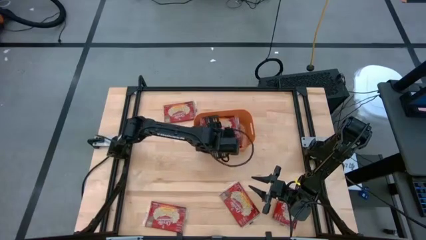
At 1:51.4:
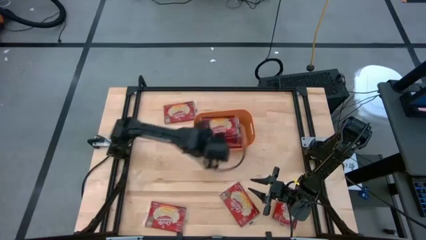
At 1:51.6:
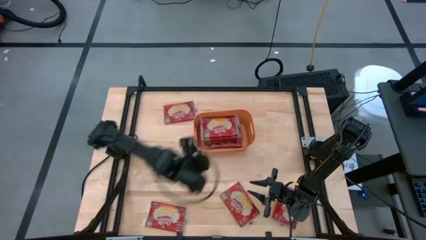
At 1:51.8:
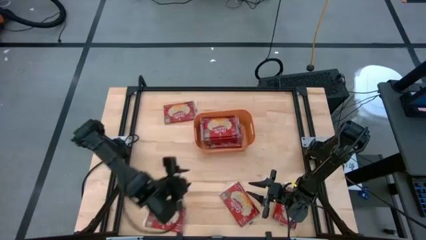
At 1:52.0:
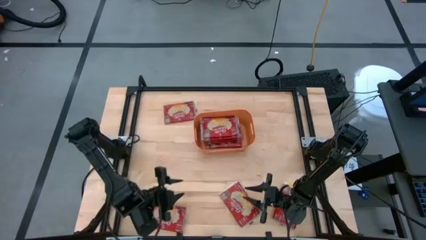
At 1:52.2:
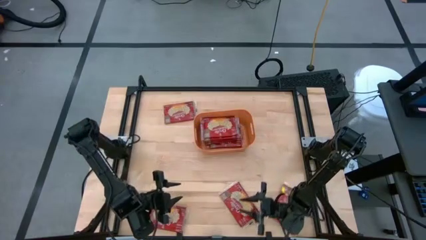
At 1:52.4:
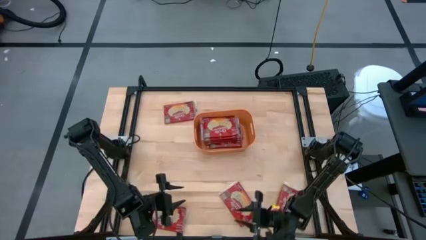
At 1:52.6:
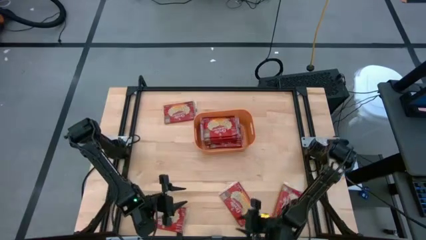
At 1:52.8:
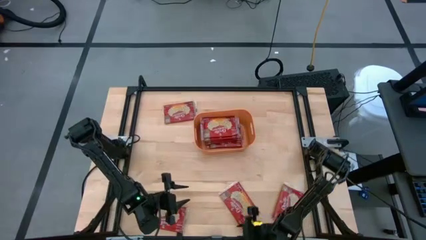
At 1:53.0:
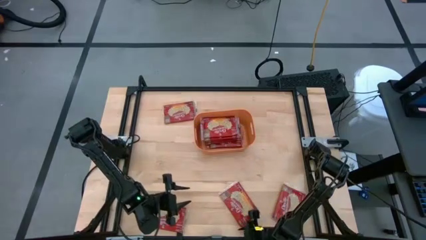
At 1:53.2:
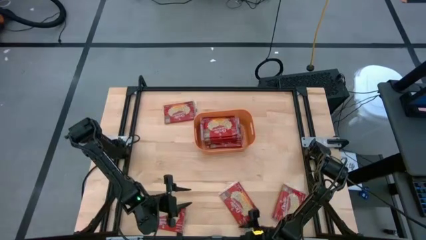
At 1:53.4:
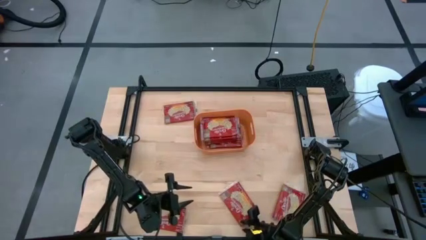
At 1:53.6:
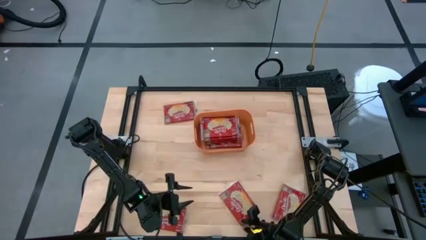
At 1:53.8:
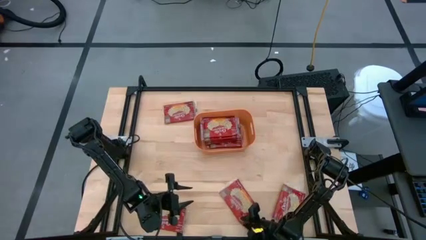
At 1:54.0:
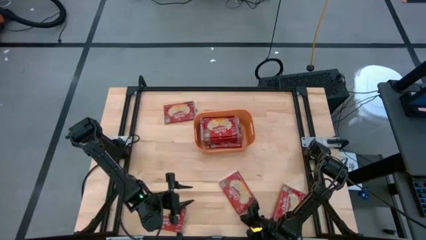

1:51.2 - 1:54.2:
Task: Sort popcorn bags into baskets
Put the red popcorn bag into the orange bin

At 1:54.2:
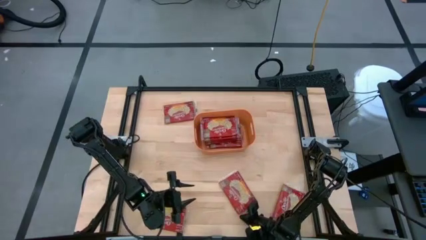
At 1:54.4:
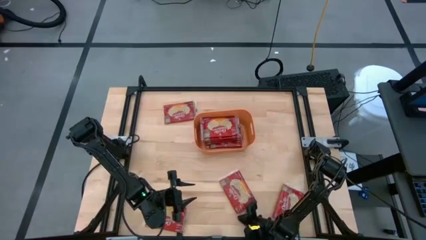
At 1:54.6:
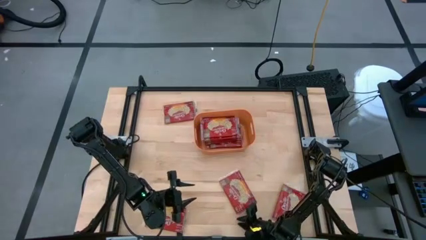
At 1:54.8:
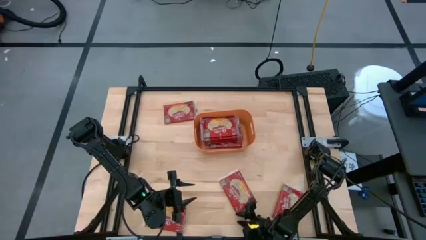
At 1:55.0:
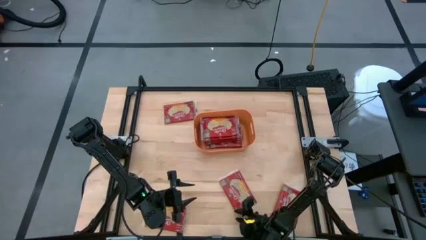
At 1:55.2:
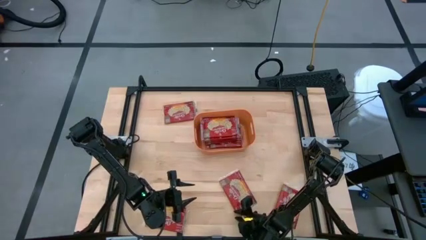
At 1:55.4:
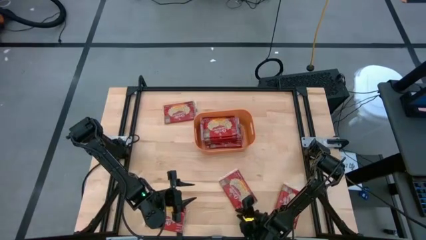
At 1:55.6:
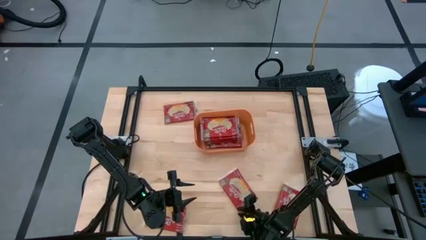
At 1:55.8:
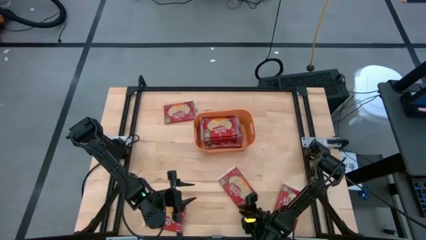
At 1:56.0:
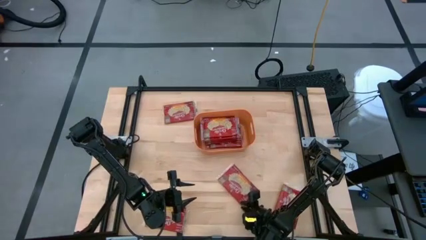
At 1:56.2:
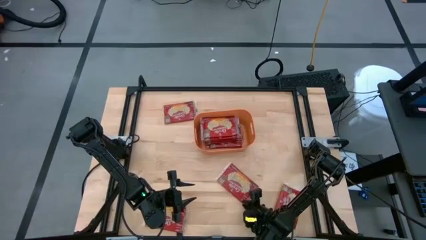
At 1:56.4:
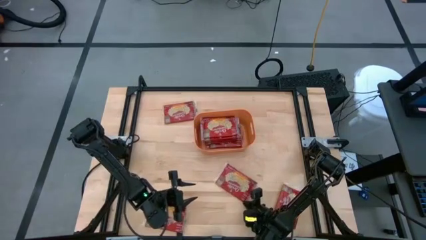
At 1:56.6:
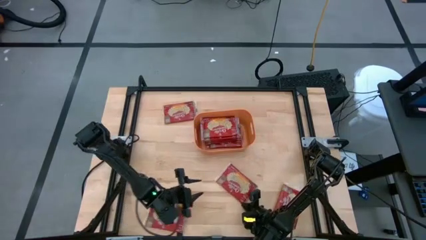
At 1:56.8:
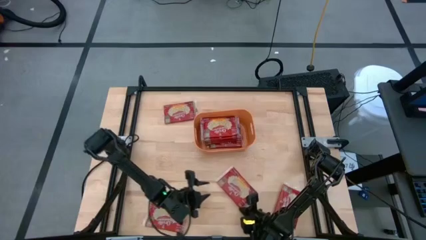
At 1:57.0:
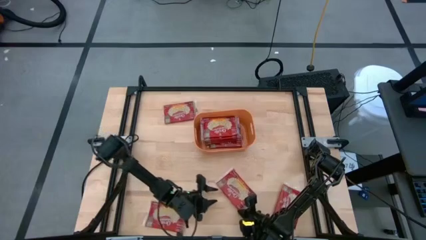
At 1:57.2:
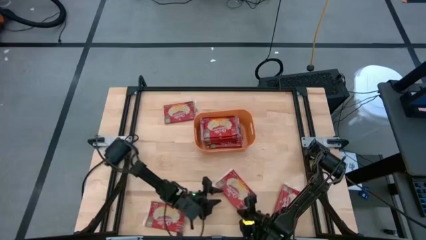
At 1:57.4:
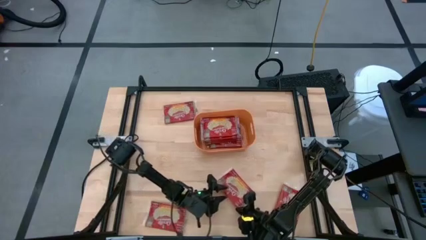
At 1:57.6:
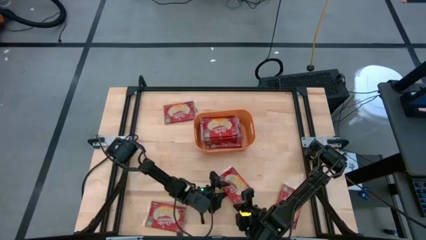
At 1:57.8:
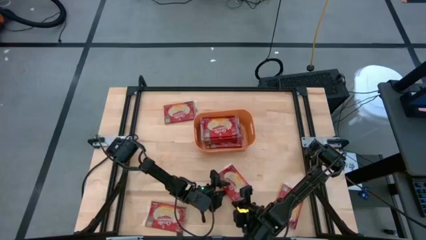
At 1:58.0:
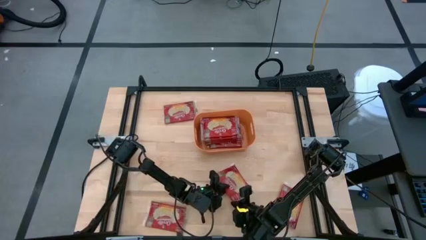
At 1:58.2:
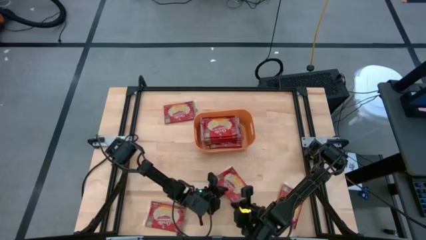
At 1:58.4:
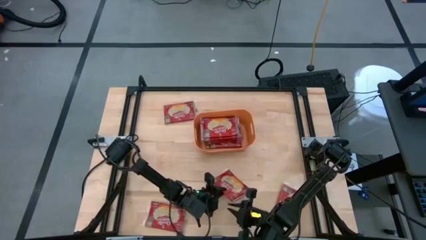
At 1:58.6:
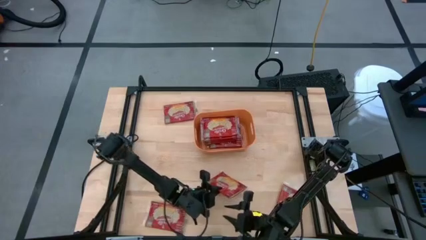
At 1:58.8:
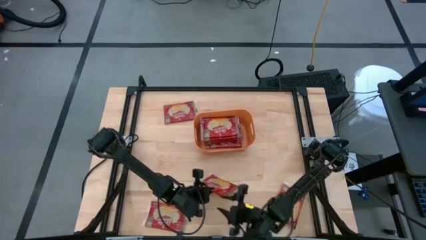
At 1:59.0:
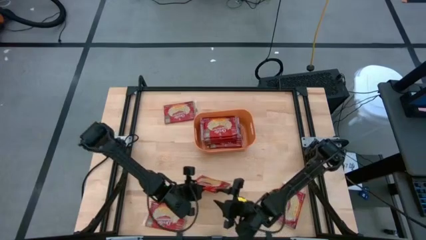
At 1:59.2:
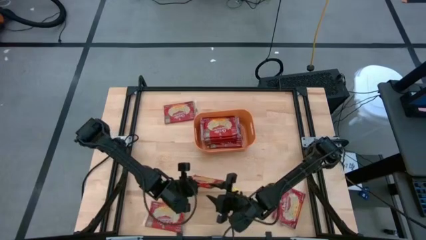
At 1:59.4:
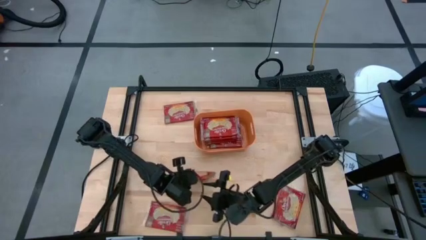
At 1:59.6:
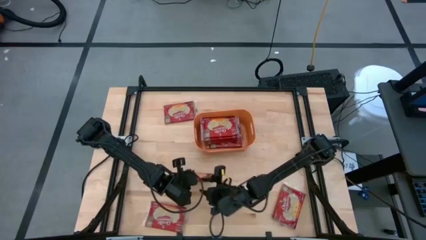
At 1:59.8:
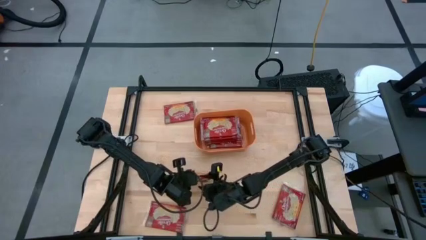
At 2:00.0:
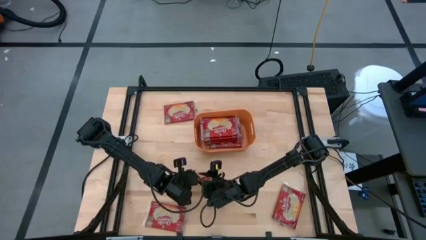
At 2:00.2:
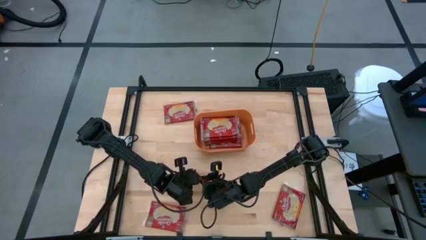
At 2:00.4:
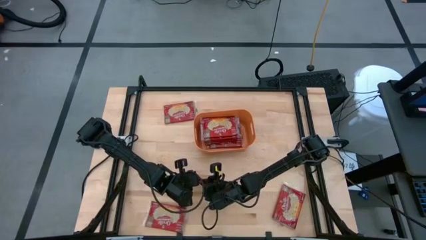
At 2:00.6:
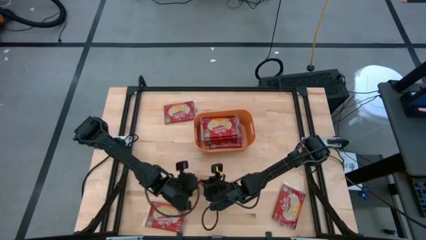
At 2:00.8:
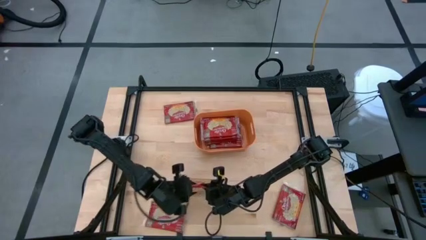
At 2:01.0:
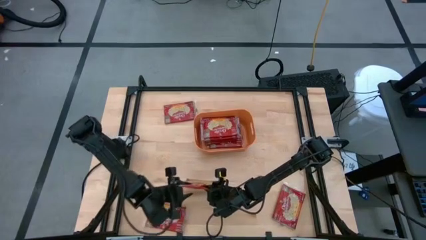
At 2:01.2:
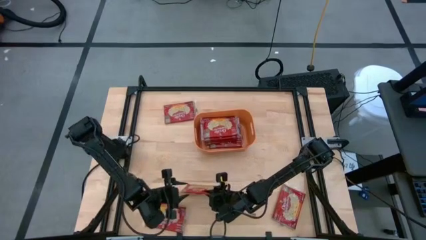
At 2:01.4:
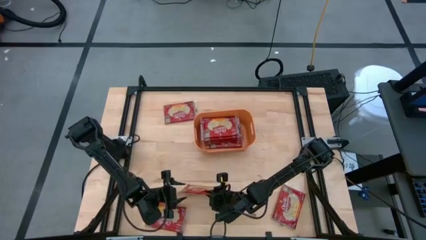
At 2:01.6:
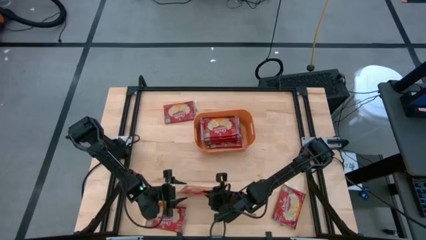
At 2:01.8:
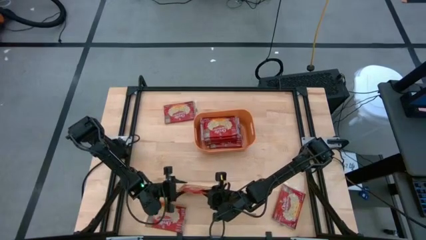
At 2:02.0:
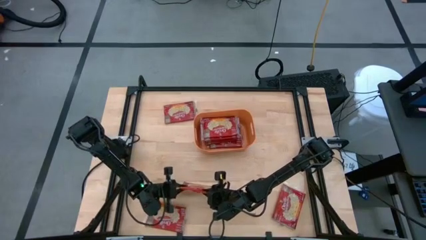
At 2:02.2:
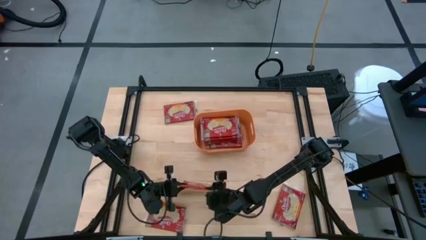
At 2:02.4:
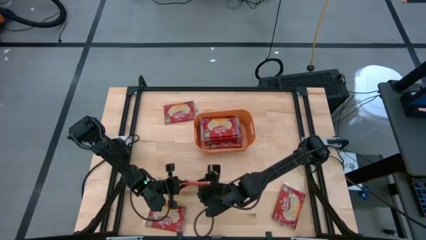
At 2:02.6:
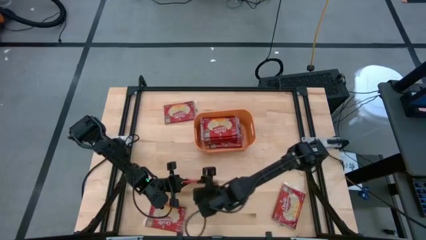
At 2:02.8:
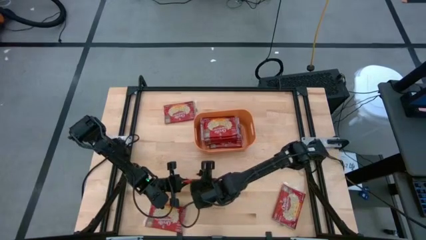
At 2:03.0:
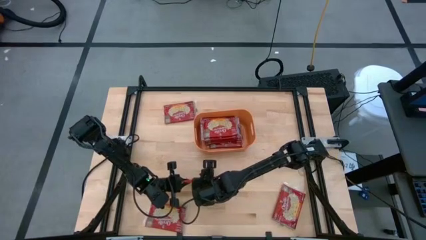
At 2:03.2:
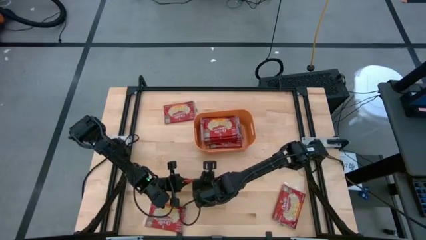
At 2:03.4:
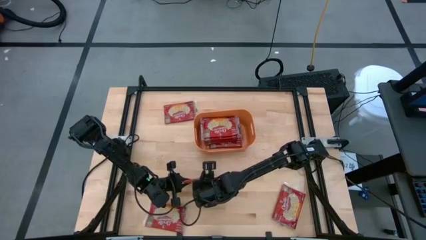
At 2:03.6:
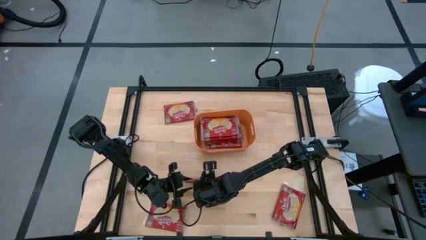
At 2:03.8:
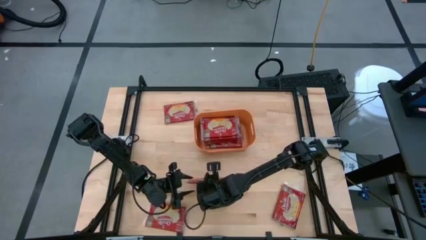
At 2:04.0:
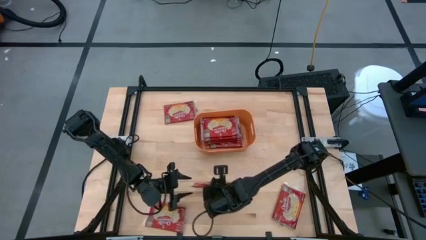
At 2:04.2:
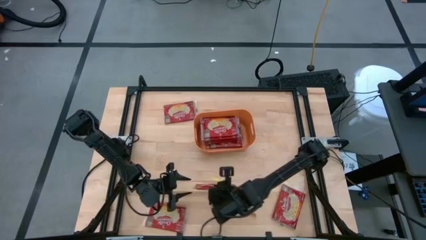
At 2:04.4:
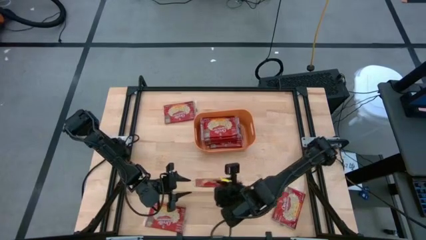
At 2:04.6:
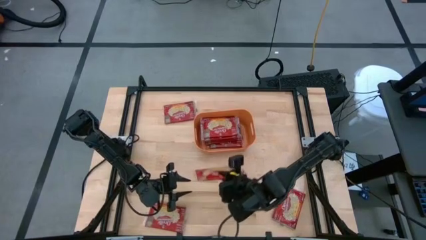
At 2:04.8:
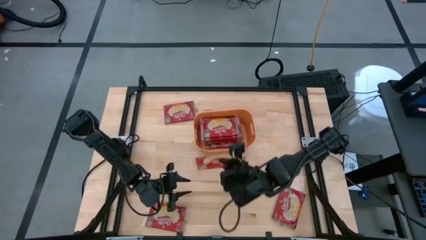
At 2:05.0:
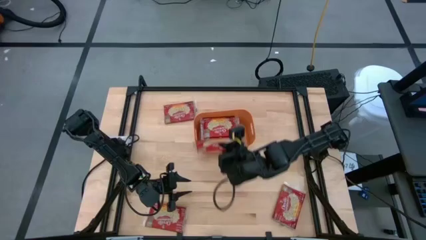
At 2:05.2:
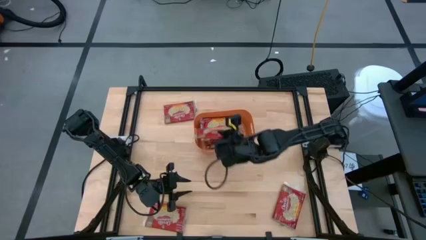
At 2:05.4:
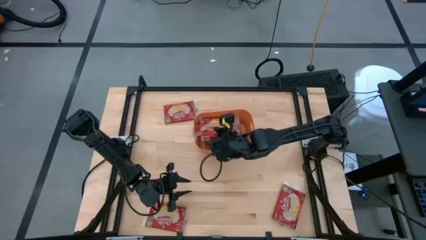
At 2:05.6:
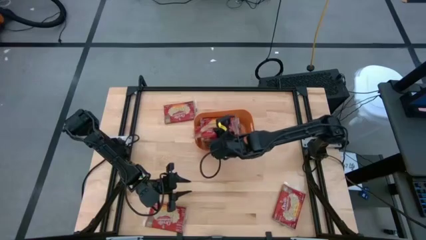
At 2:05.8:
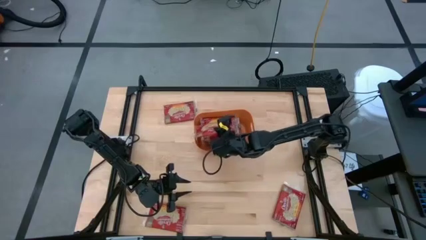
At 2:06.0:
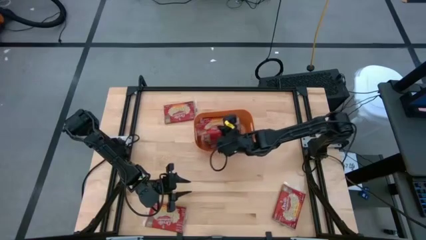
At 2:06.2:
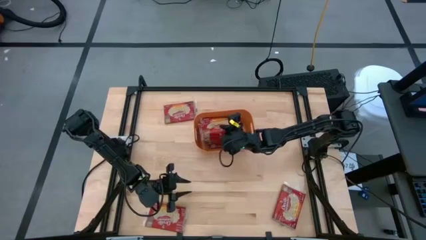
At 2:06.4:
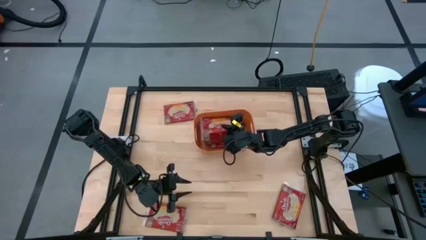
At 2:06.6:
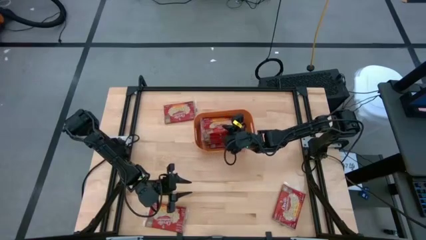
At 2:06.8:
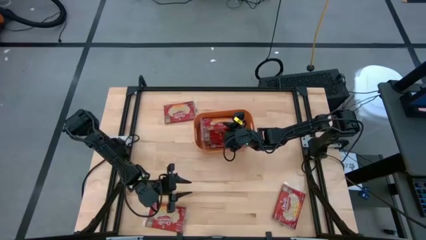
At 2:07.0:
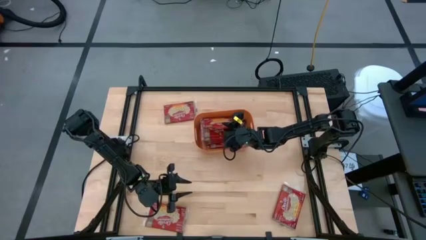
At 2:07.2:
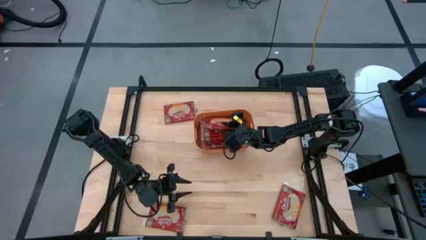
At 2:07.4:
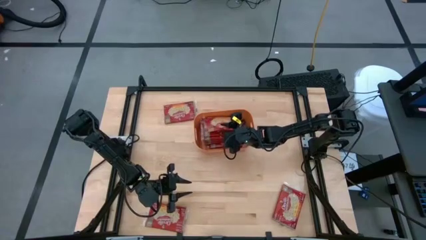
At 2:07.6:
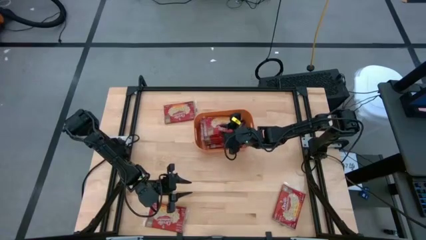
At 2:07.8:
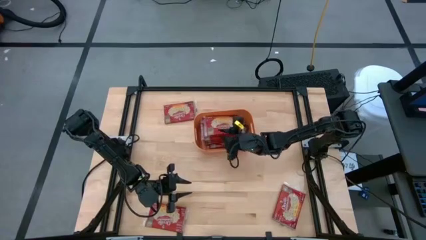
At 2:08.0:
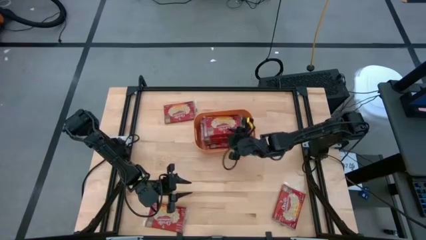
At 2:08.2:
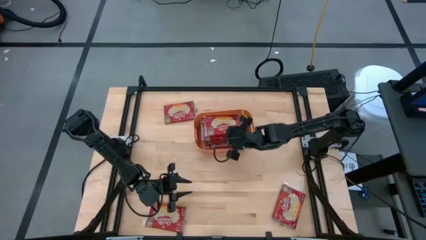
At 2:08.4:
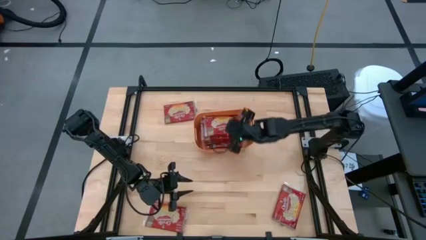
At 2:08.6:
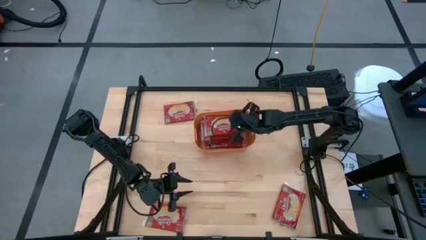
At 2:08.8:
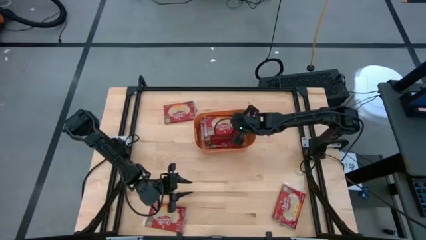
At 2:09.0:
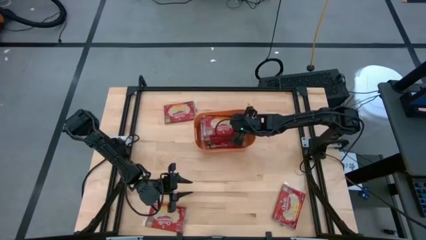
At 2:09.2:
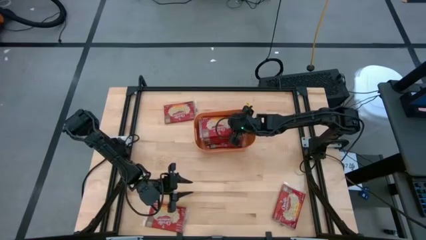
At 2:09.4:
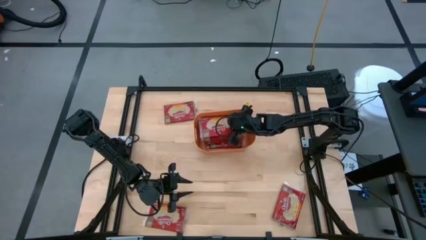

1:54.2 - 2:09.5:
Put the red popcorn bag into the orange bin
